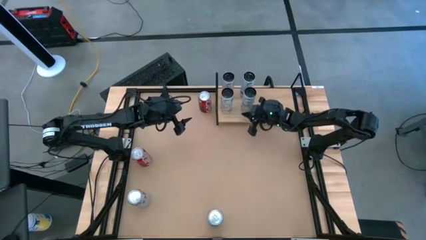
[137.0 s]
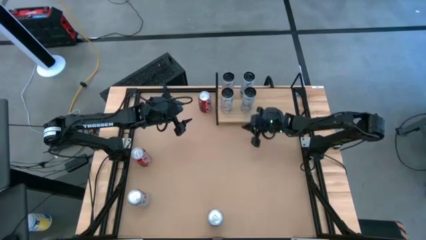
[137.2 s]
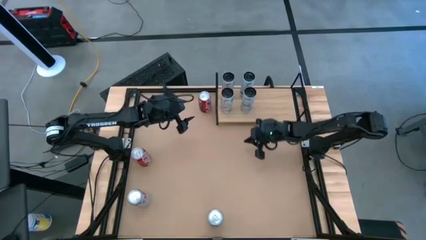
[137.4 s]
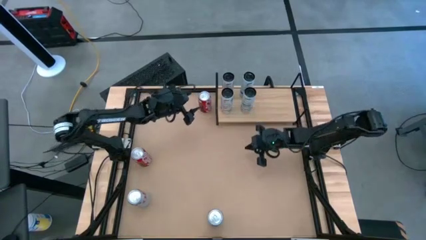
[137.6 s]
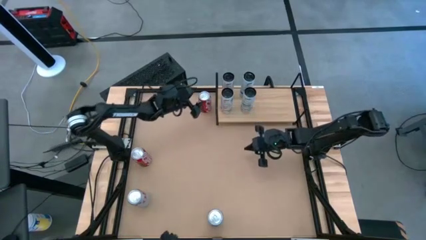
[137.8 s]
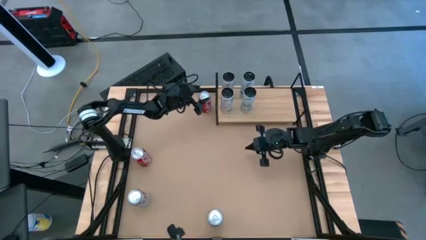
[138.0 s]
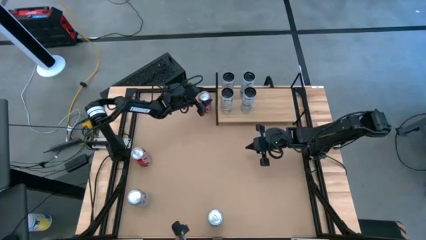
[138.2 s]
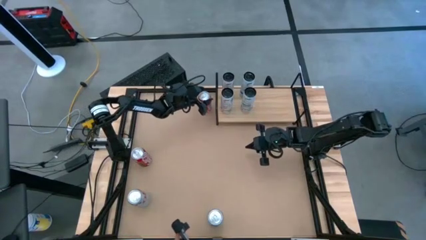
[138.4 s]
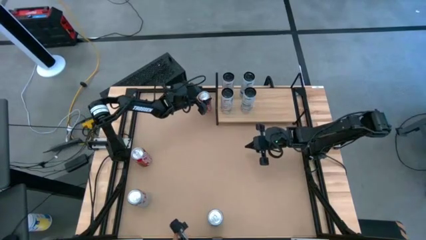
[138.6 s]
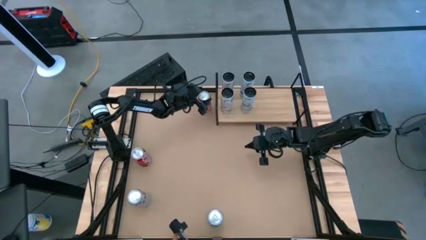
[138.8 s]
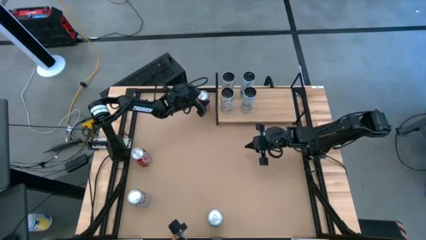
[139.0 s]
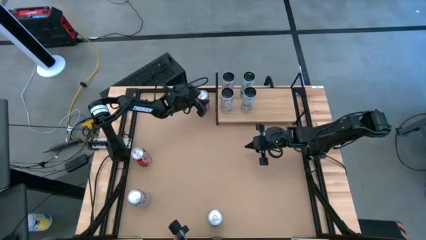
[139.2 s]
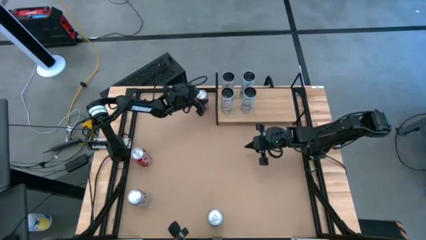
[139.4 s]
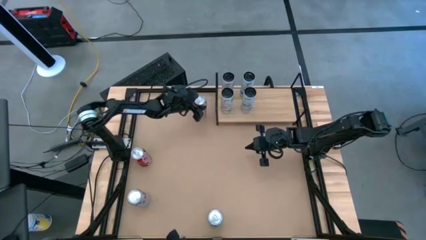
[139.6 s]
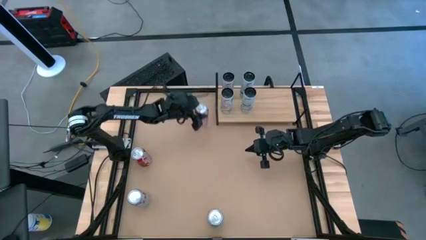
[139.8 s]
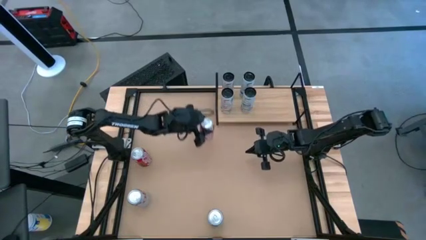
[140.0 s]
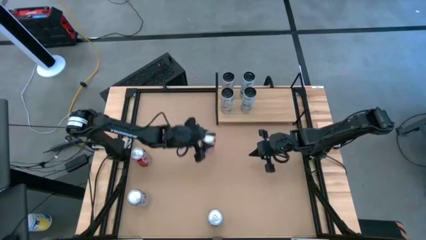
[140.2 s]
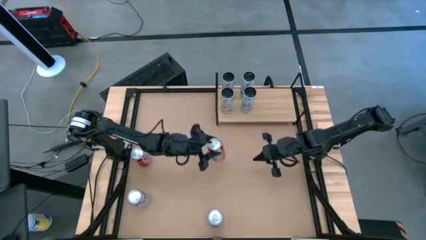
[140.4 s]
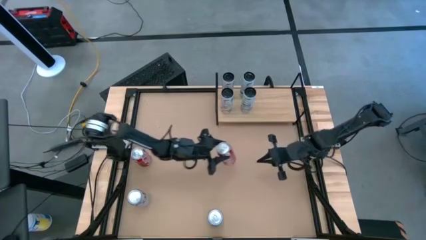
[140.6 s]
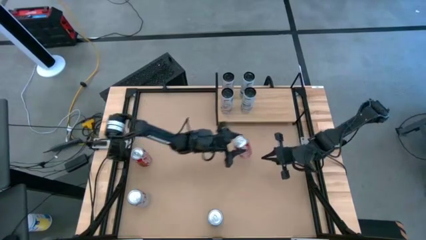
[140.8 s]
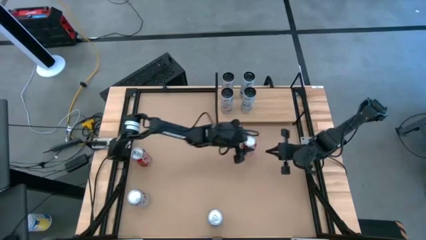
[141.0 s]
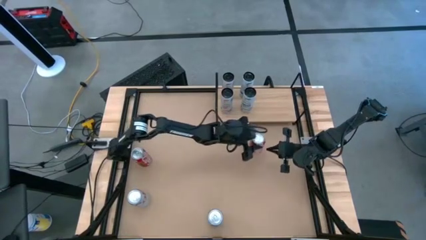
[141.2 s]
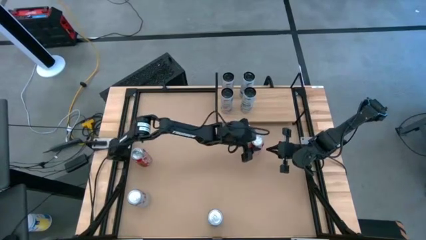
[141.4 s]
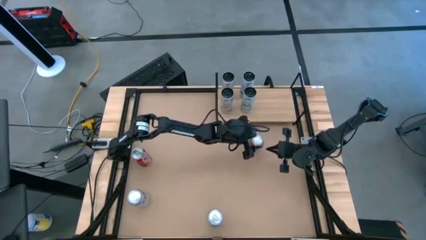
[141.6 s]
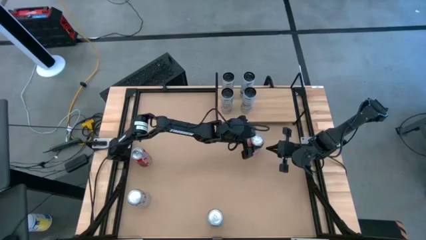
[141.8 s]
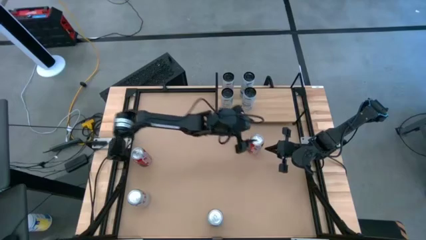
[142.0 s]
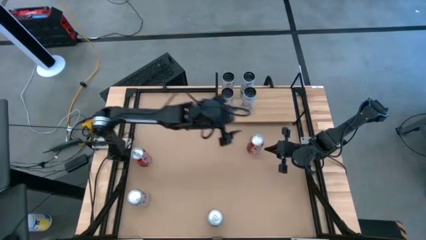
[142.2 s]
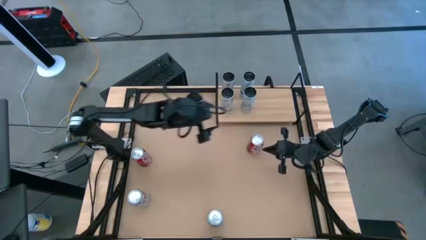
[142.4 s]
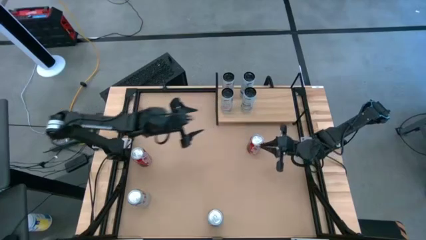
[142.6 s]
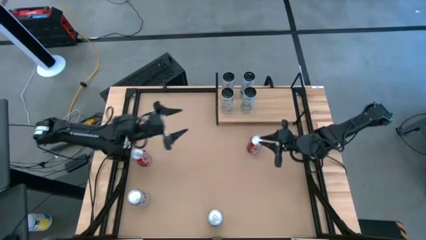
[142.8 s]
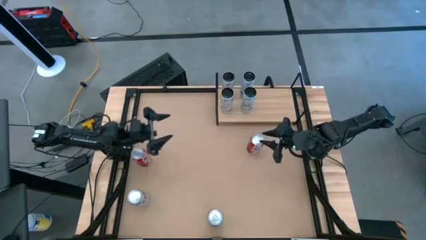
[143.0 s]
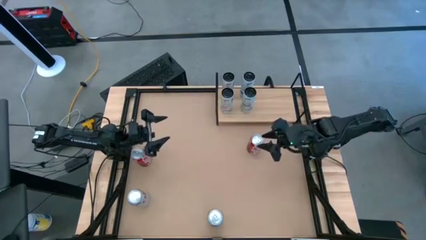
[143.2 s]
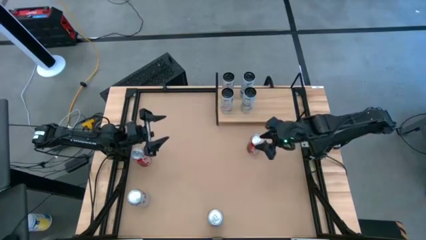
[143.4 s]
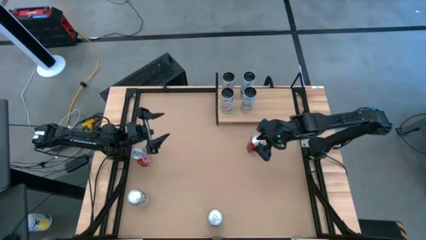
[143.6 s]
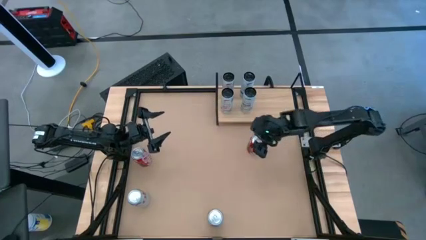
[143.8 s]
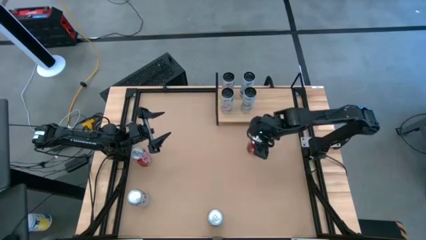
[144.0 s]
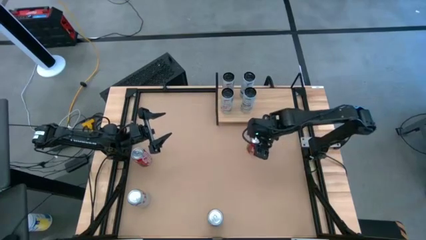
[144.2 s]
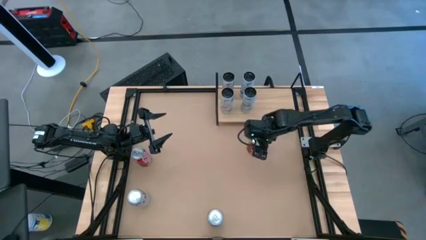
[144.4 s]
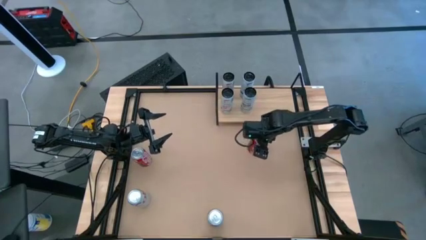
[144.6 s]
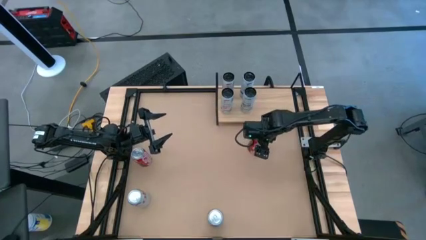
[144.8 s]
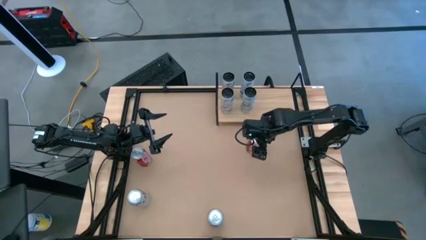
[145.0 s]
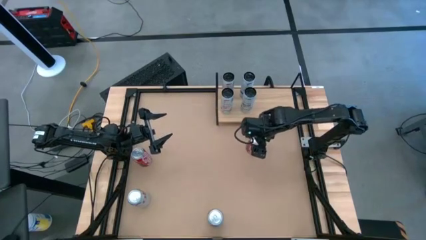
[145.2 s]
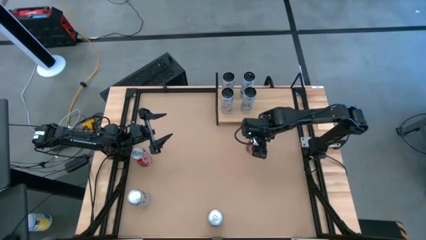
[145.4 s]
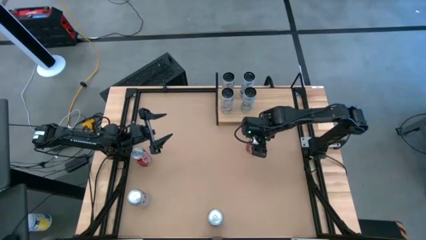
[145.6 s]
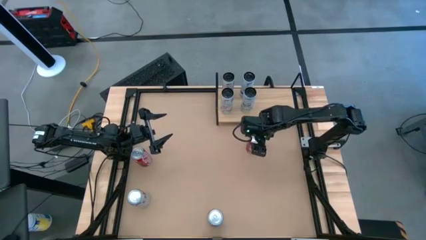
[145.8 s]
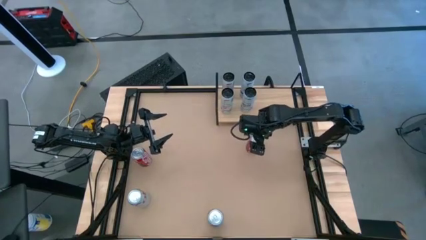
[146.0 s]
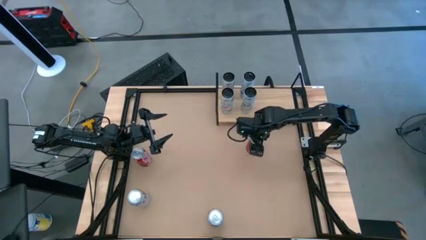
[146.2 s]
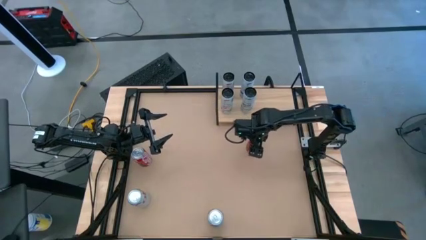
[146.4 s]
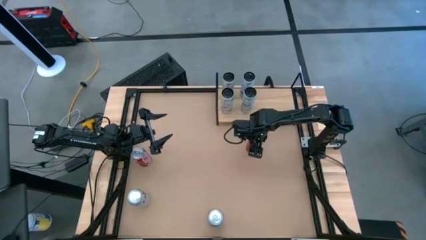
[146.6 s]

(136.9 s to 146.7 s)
Task: Place canned beverage on shelf
Put the top red soda can on the shelf

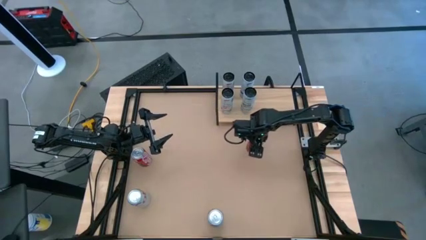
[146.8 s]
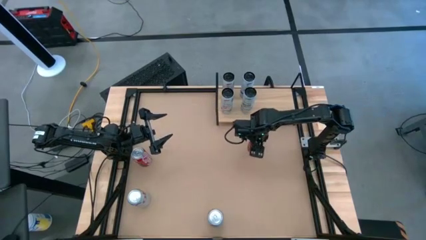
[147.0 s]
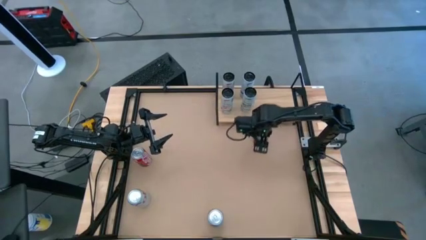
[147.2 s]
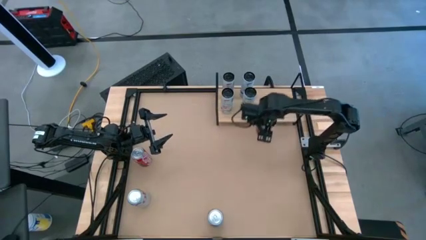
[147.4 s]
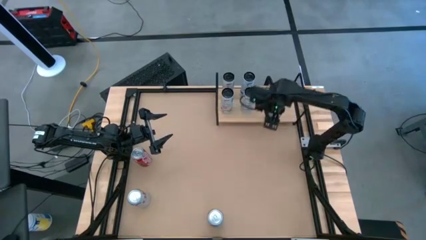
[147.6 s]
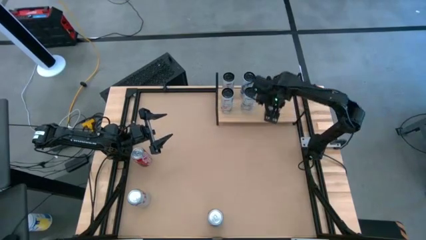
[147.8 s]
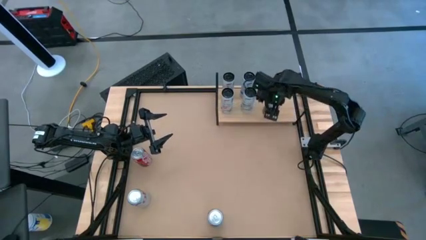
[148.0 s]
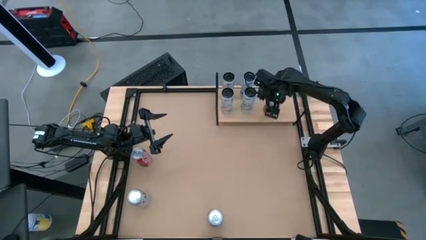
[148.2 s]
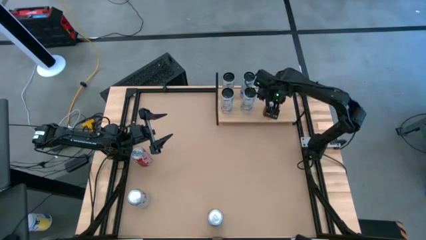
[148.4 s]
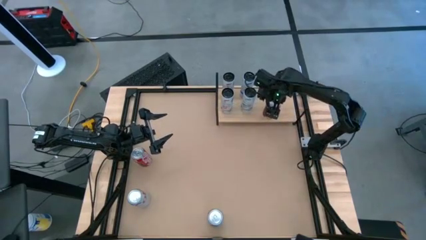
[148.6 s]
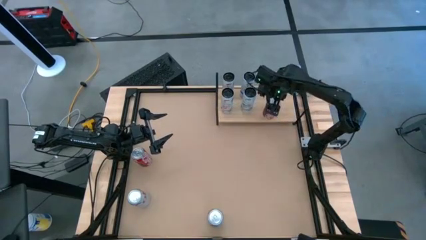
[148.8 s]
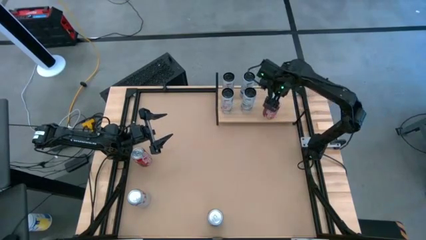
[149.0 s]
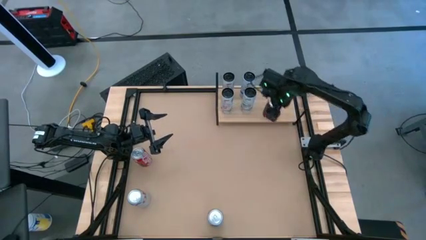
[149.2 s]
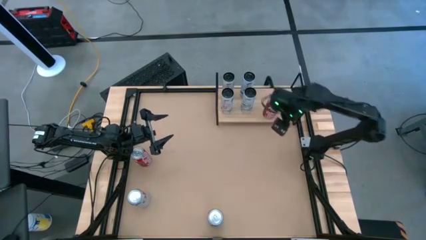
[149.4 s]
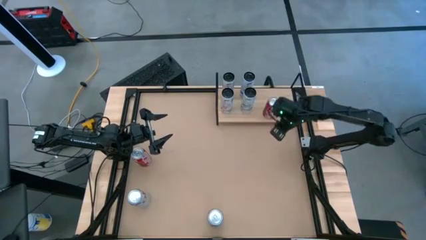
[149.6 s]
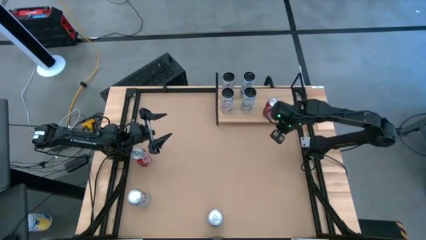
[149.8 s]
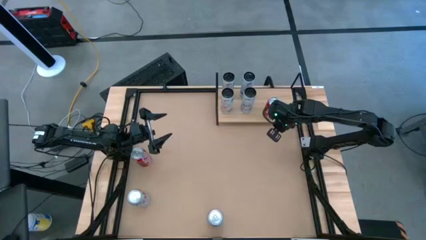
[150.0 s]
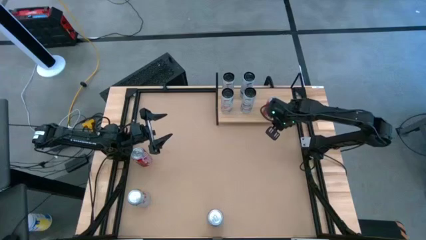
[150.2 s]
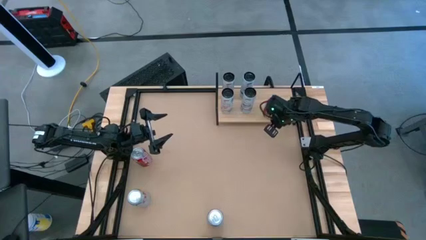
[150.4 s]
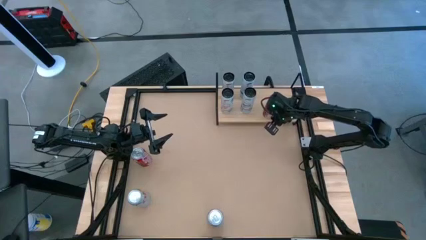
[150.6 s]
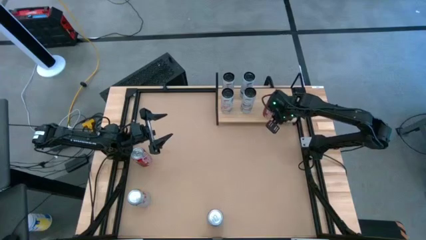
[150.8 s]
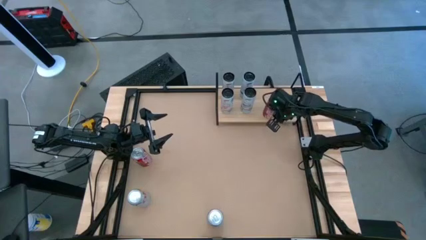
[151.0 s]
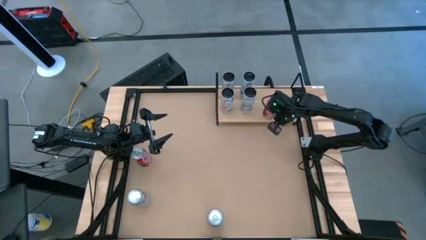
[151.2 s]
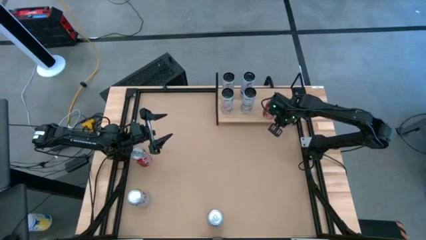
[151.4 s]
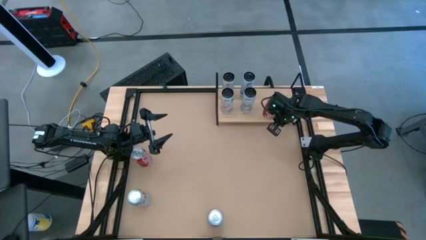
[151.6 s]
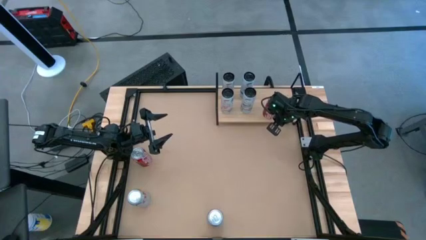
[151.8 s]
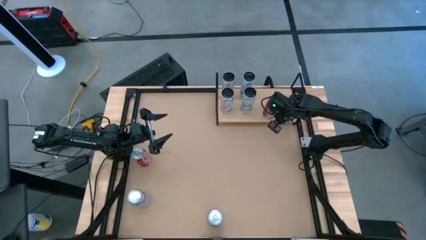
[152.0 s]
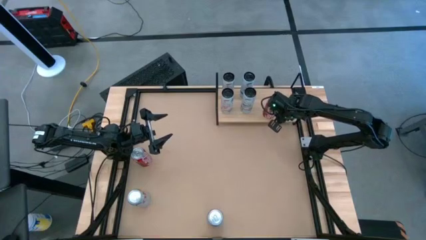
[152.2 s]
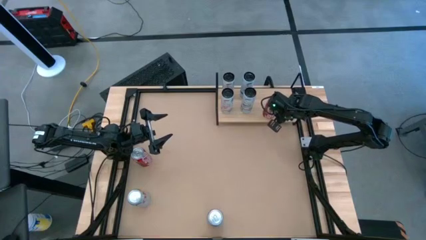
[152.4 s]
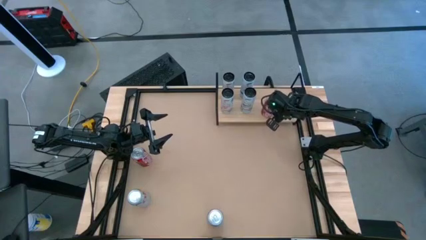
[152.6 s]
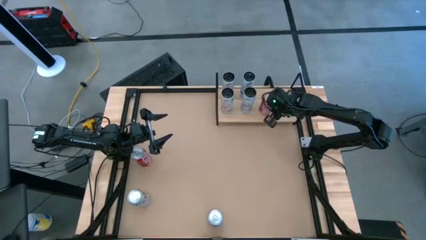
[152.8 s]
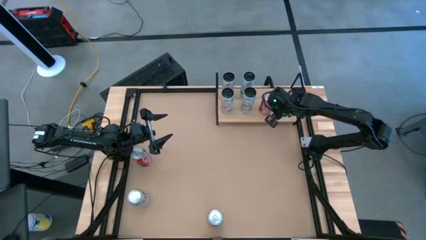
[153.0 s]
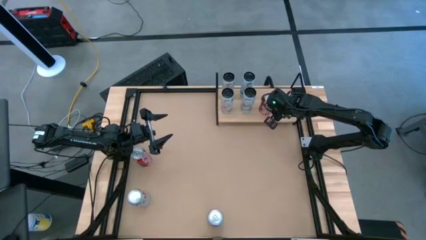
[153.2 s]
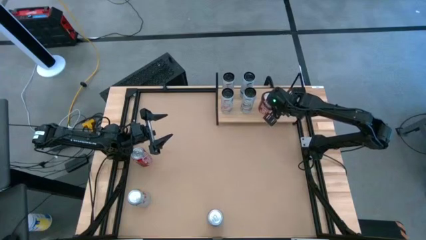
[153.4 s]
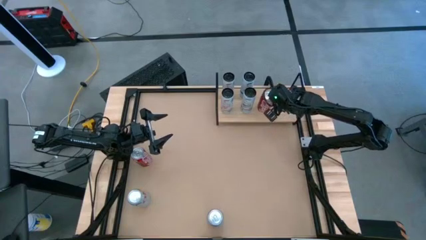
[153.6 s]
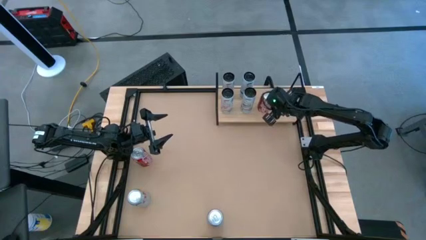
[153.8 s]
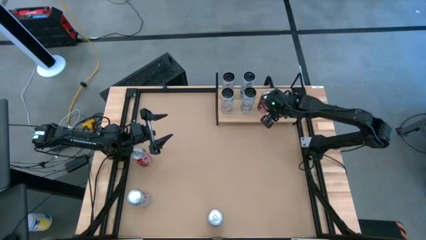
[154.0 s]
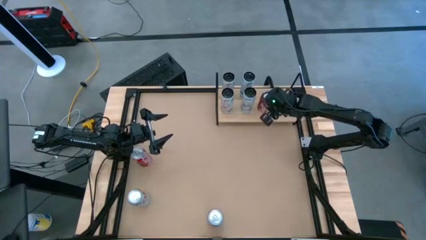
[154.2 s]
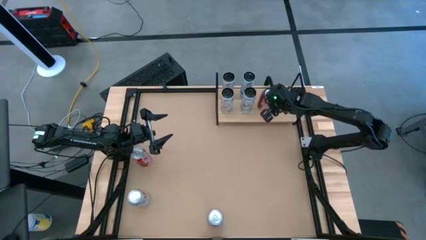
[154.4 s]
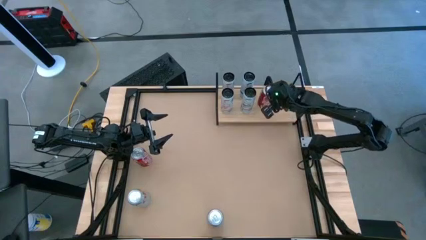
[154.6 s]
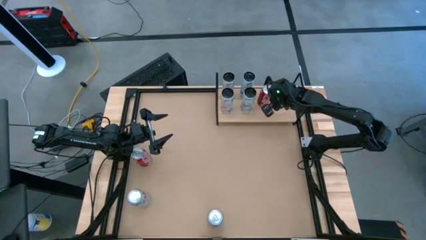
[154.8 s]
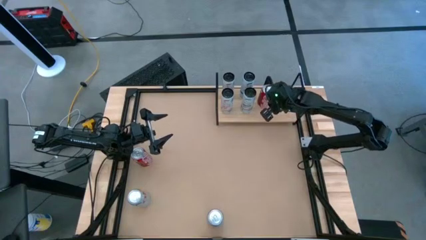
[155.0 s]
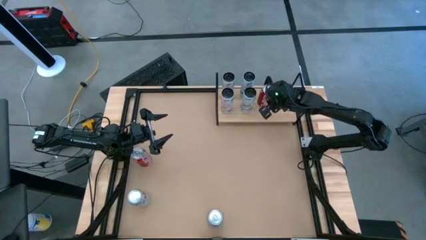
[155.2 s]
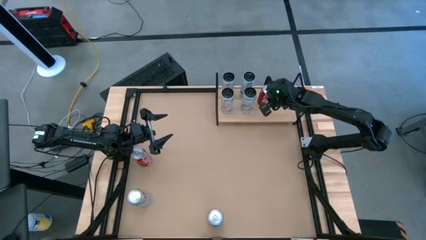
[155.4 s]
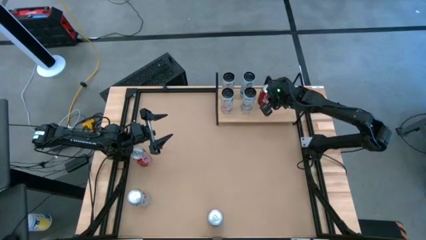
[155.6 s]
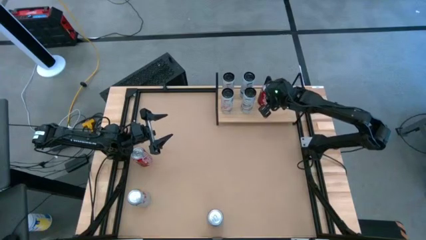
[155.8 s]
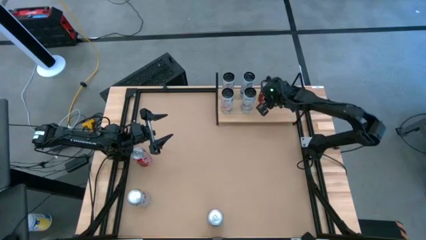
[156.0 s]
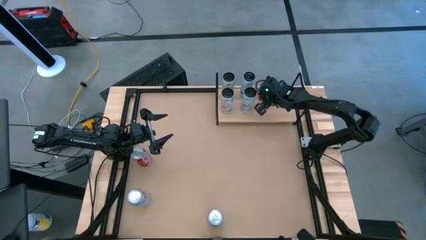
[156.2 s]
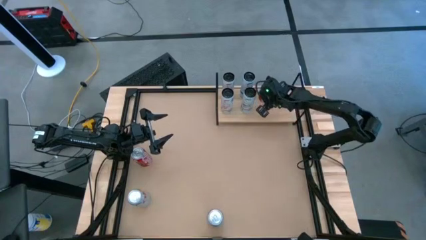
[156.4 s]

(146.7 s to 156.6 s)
Put the top red soda can on the shelf
